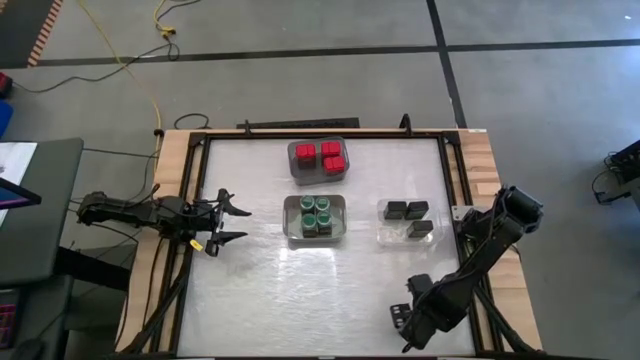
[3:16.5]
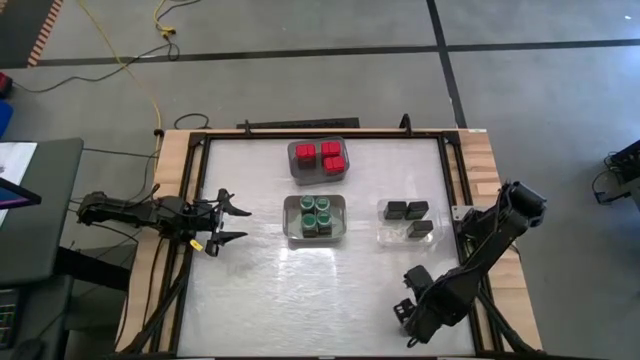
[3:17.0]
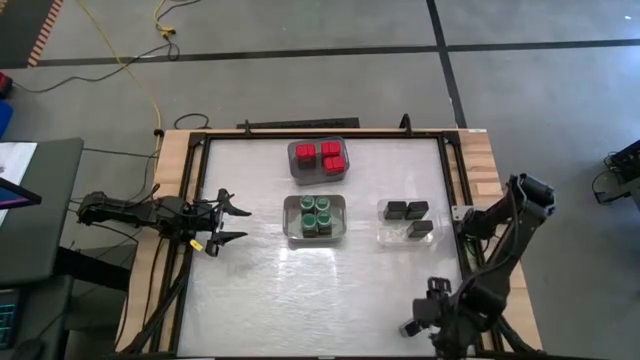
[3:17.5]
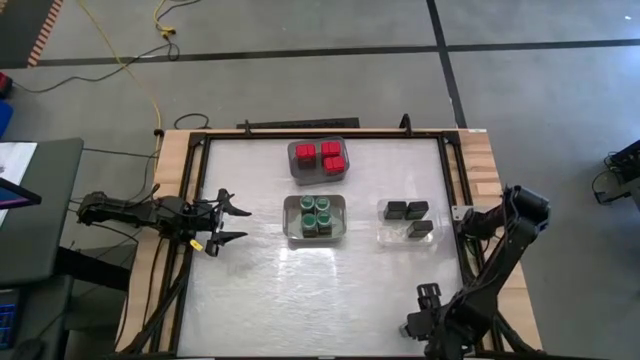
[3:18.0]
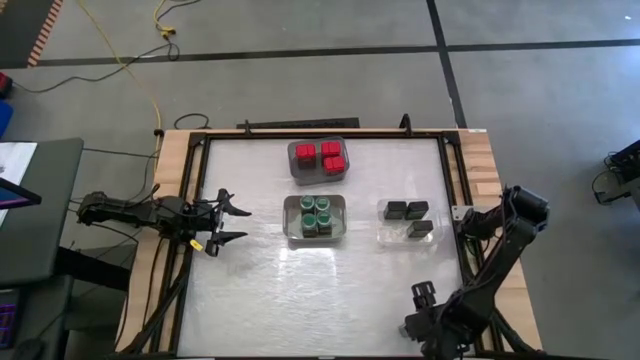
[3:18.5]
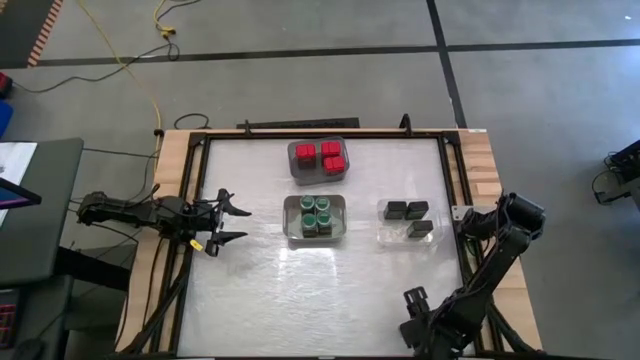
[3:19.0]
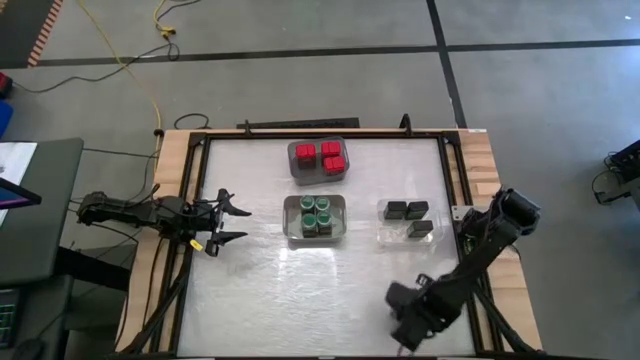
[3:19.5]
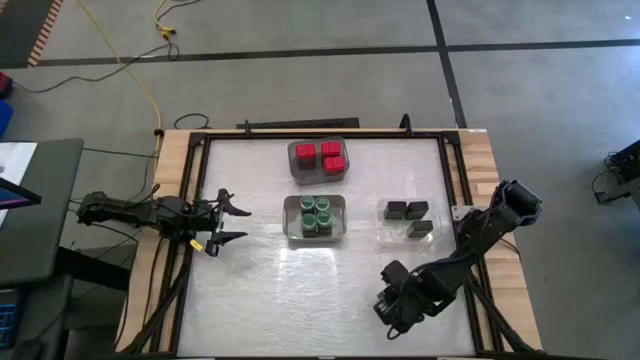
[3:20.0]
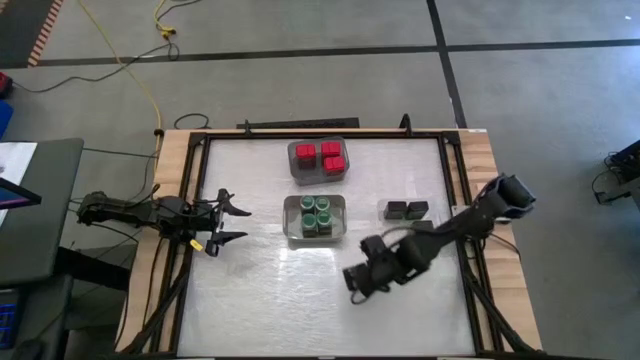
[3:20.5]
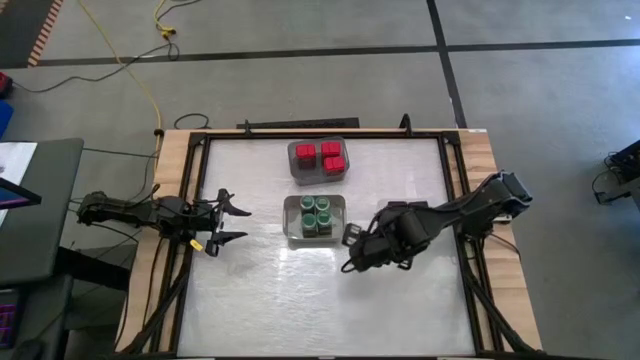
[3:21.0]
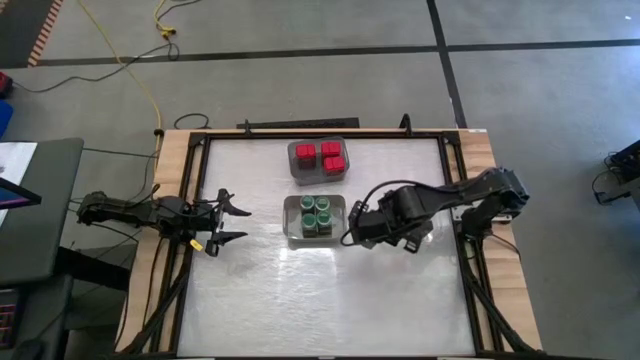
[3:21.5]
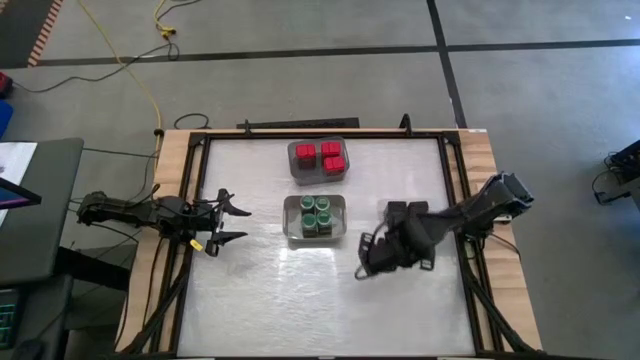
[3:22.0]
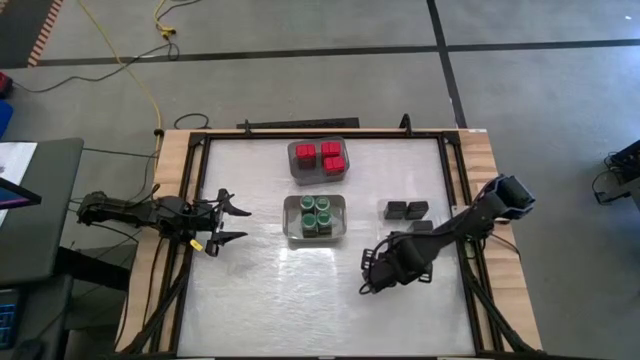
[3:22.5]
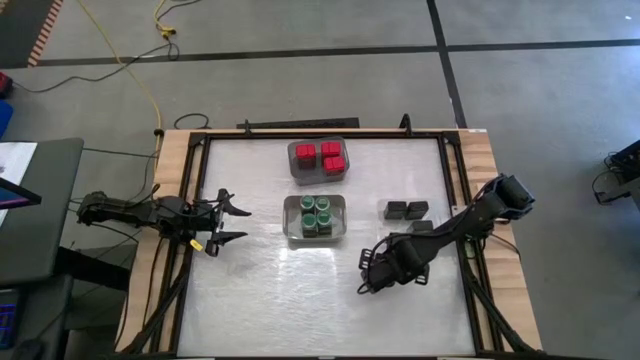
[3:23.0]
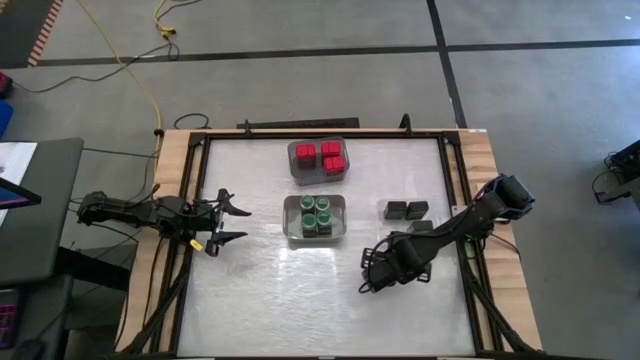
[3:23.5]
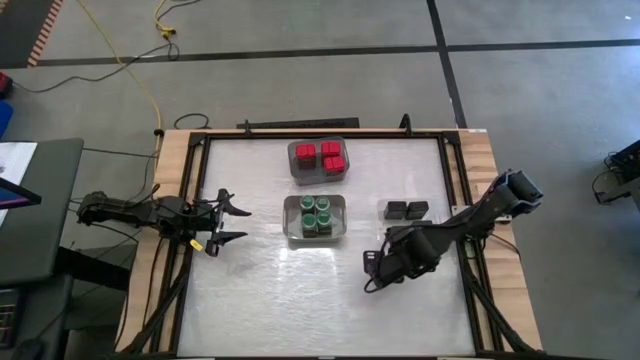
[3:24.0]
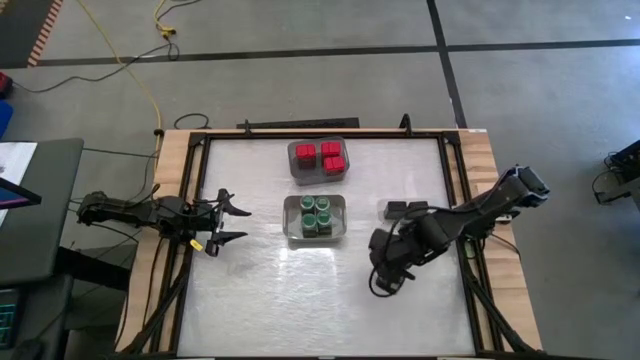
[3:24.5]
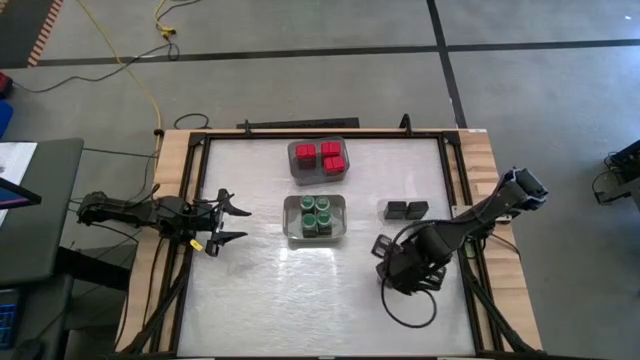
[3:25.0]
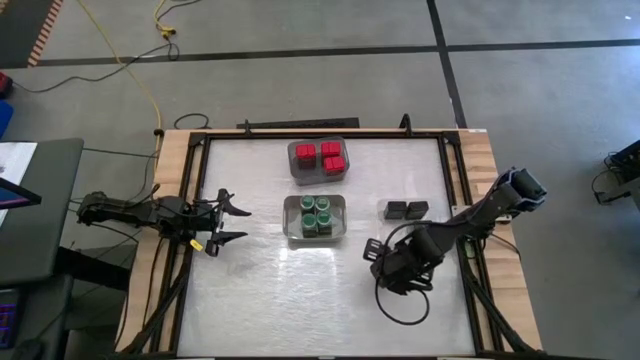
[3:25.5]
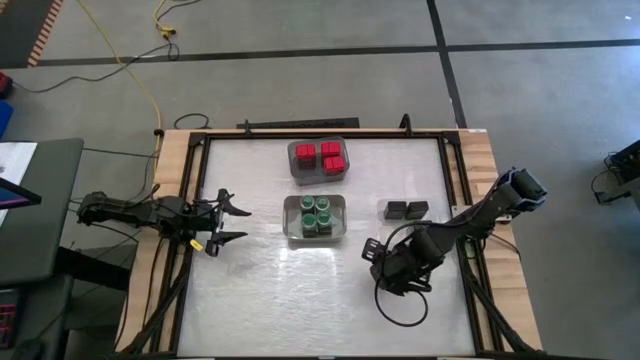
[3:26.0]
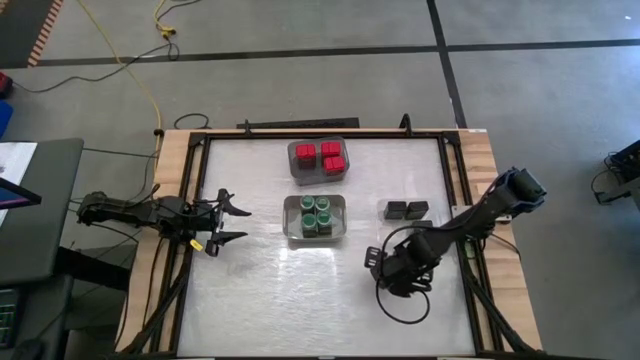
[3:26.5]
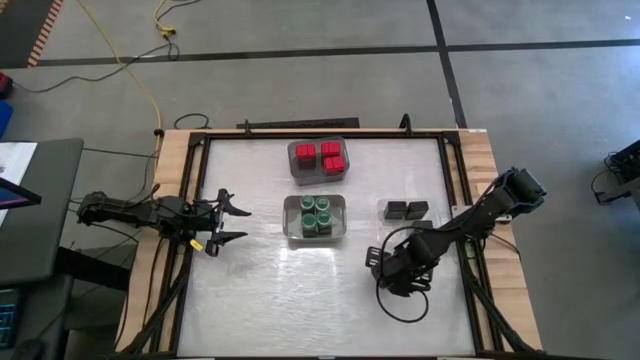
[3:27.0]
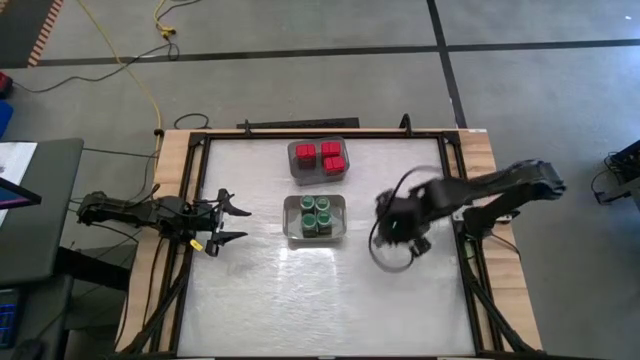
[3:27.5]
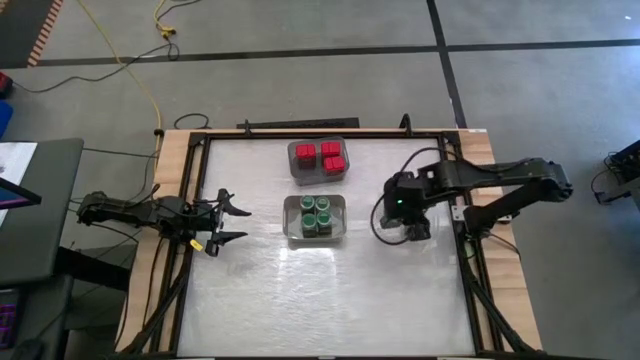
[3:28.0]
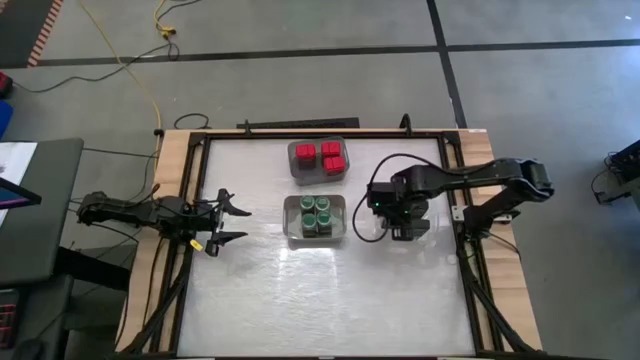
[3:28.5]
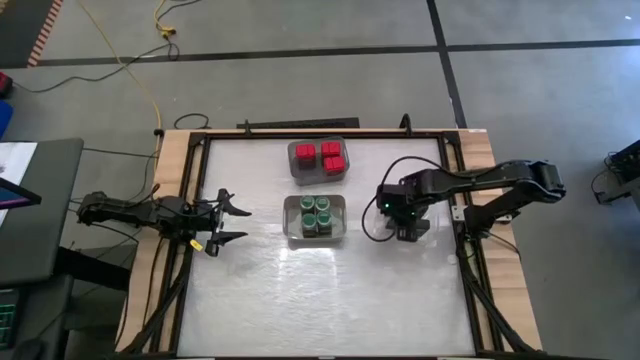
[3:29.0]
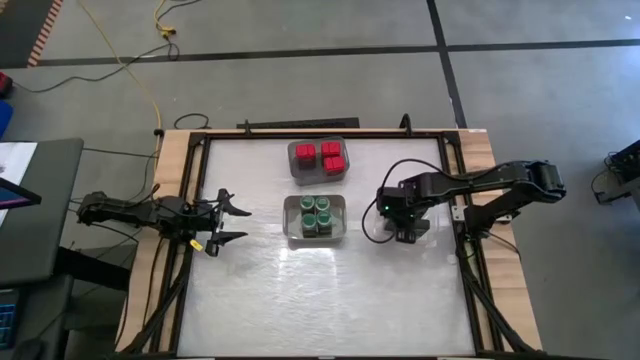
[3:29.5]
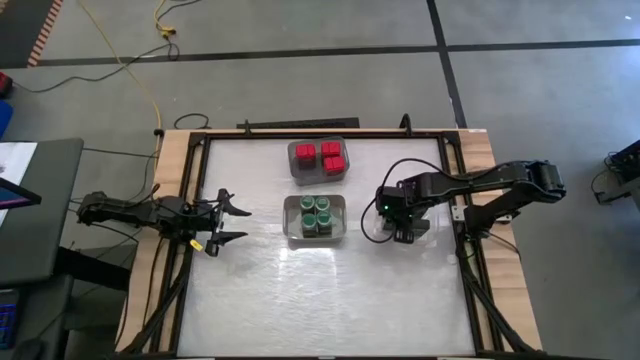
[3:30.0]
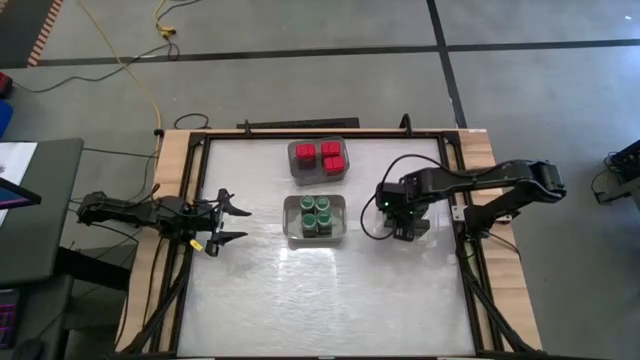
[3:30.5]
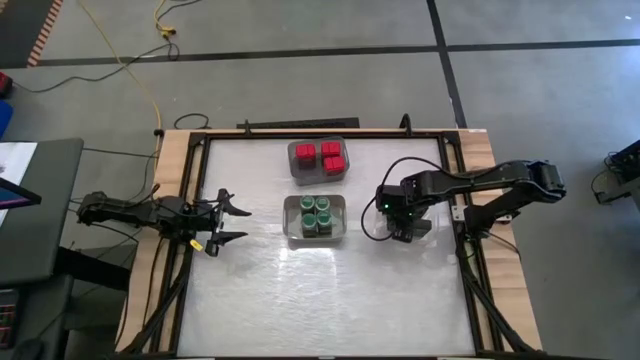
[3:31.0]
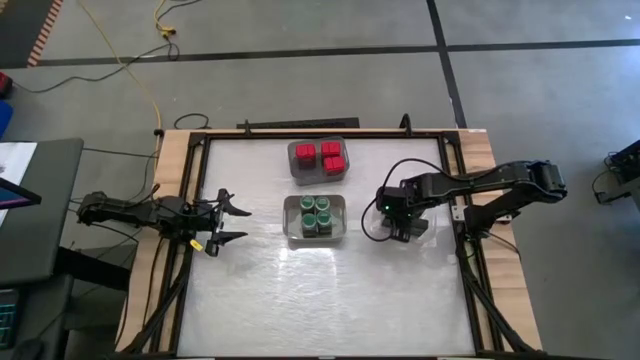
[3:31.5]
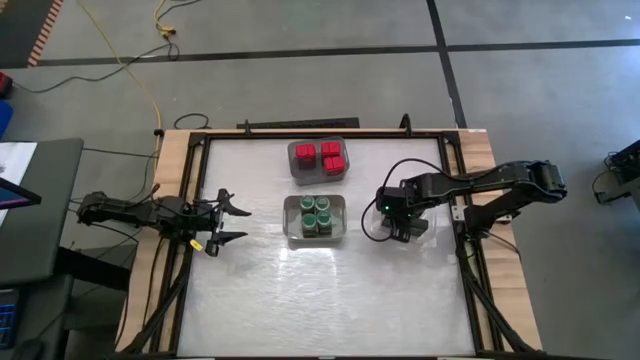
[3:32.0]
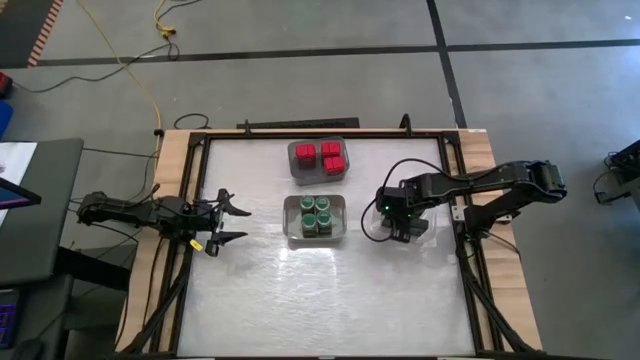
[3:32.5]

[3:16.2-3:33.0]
Task: Sort spices by type
Put the black spice can into the transparent bin

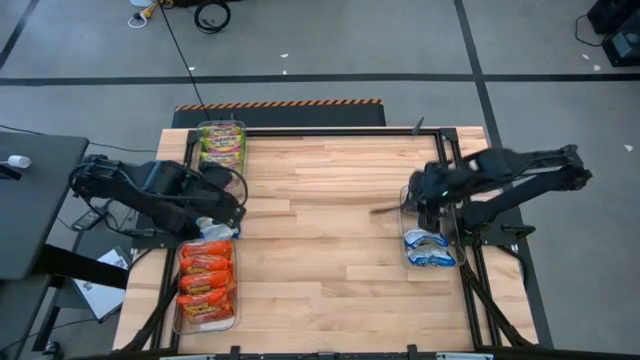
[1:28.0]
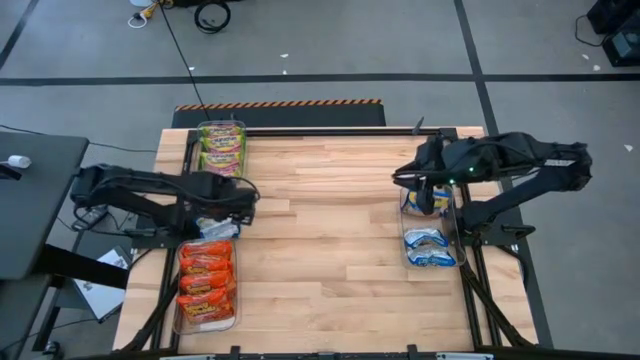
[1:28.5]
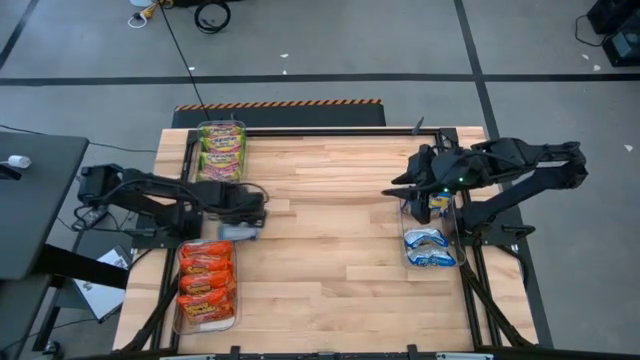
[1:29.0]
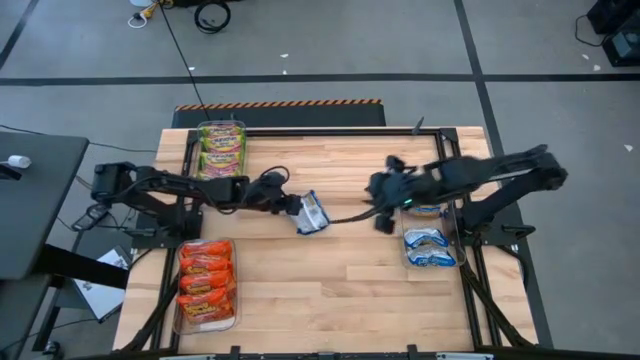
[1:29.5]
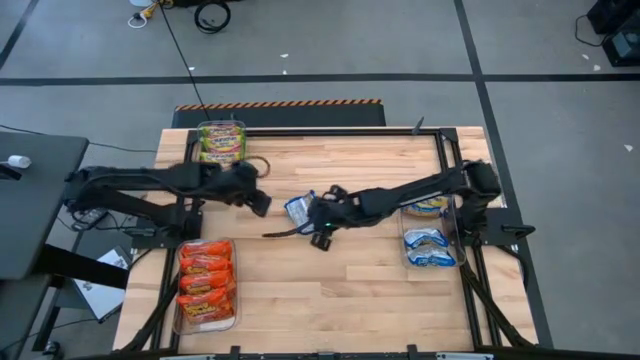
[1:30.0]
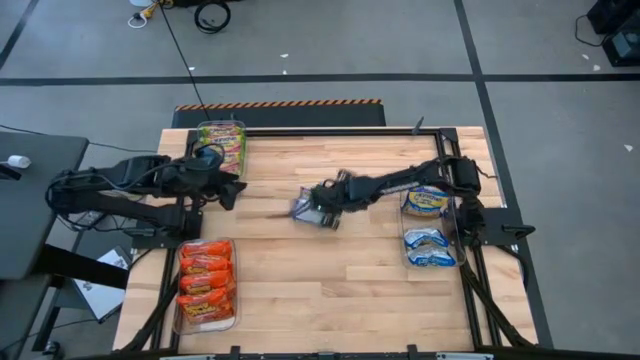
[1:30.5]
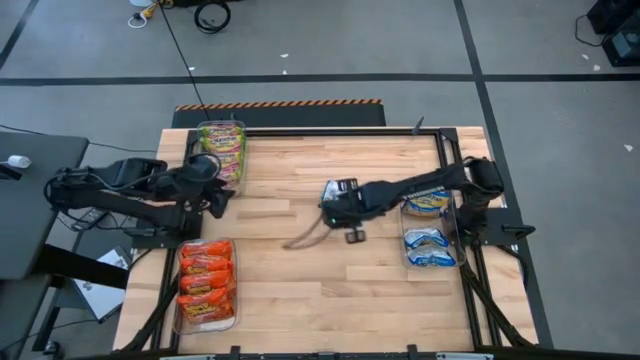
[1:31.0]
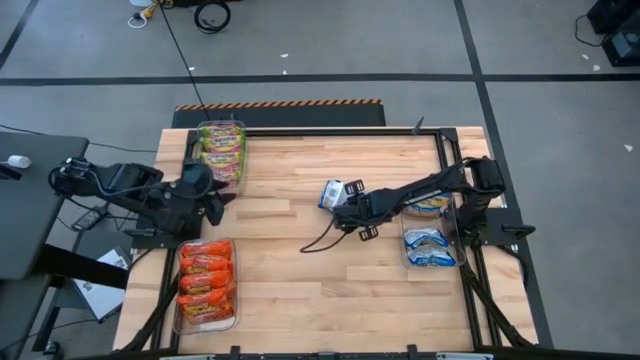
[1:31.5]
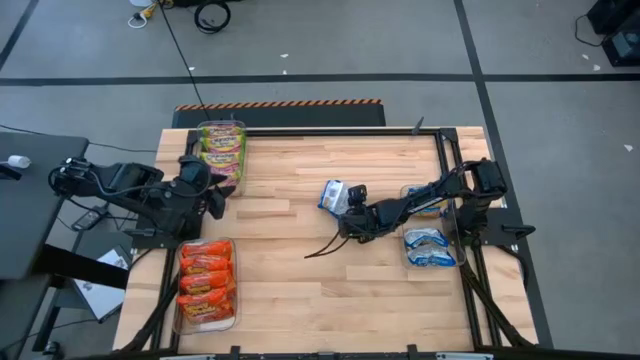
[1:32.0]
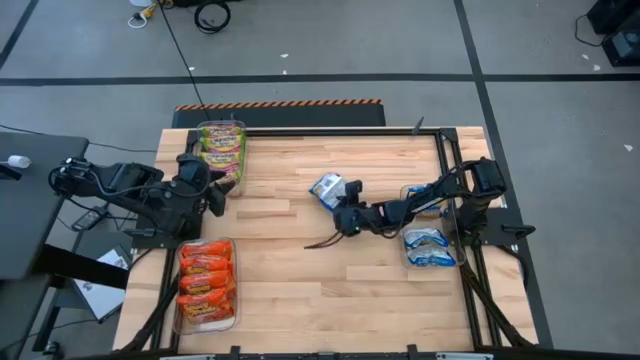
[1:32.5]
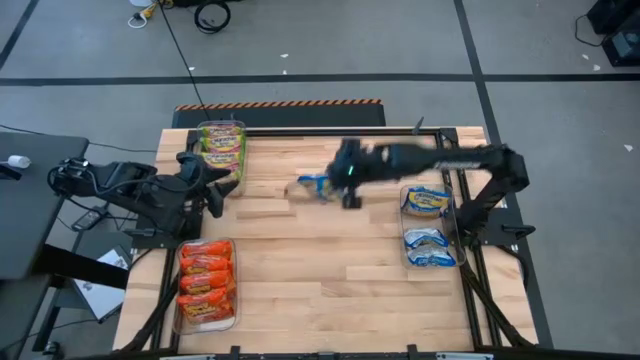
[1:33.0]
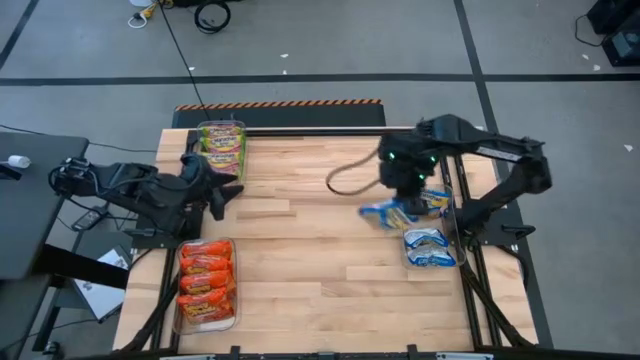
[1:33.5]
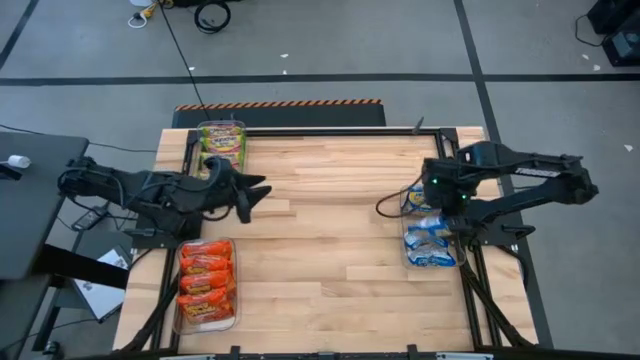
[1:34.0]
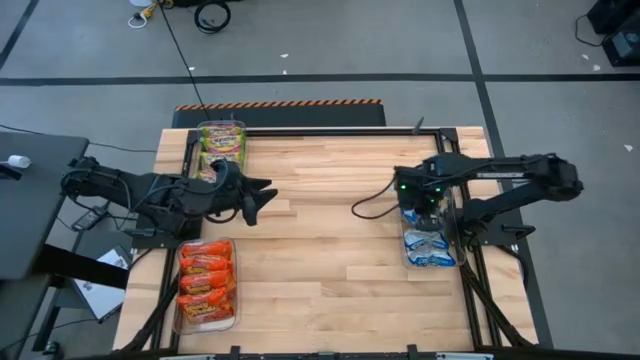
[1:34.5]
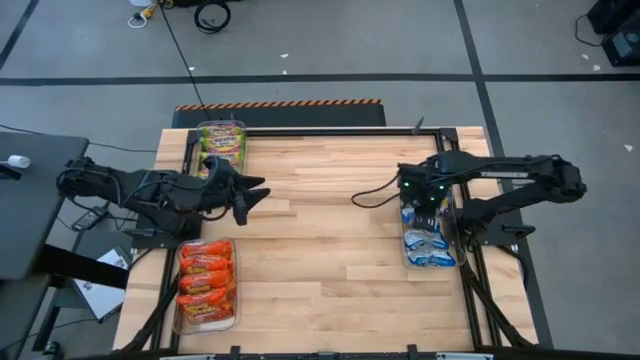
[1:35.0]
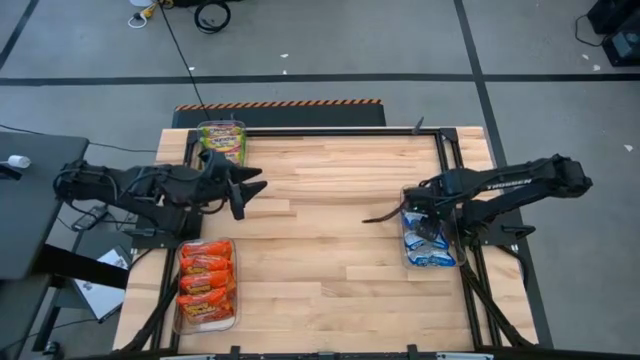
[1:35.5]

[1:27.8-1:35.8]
Task: Sort Maruchan noodles
Put the blue noodle pack into the right transparent bin
